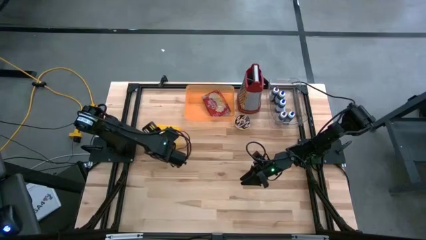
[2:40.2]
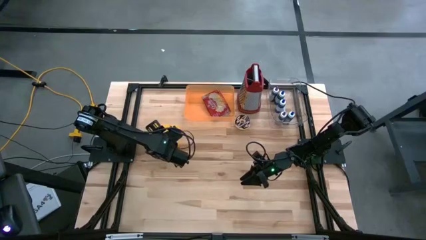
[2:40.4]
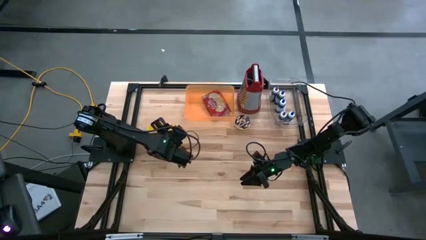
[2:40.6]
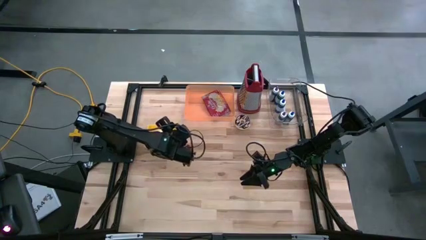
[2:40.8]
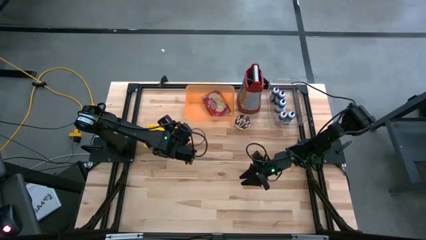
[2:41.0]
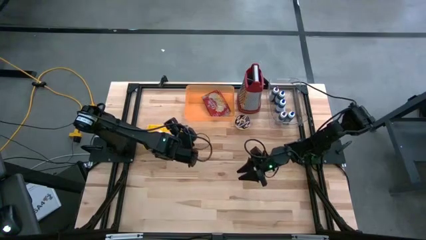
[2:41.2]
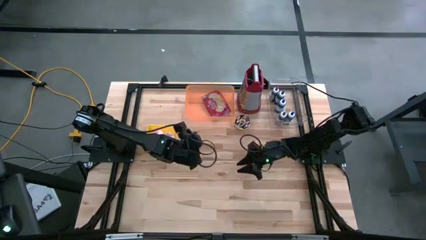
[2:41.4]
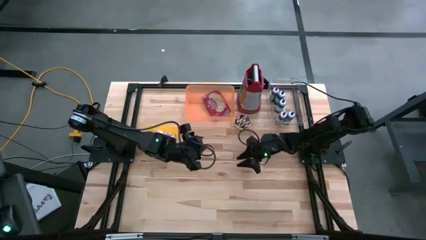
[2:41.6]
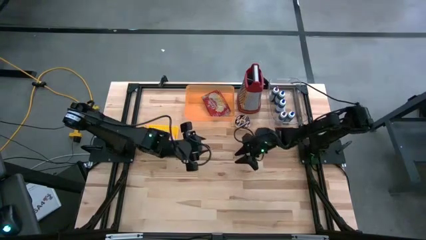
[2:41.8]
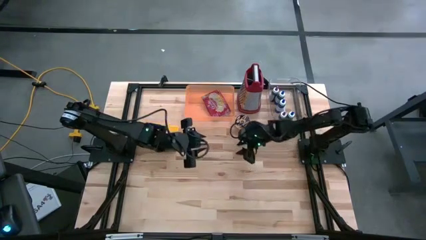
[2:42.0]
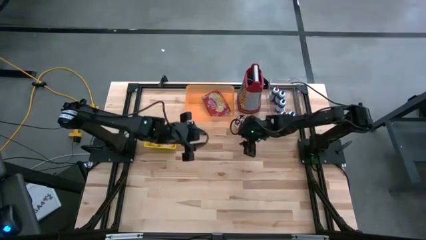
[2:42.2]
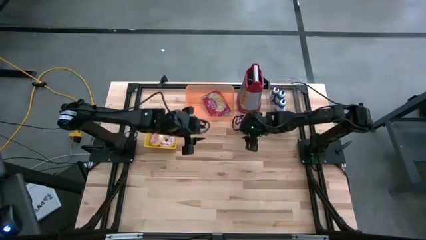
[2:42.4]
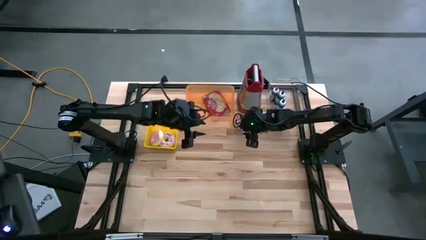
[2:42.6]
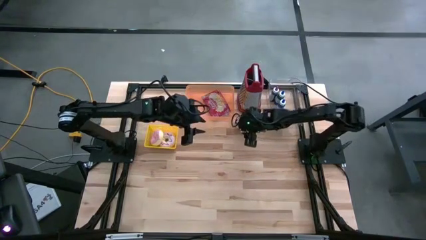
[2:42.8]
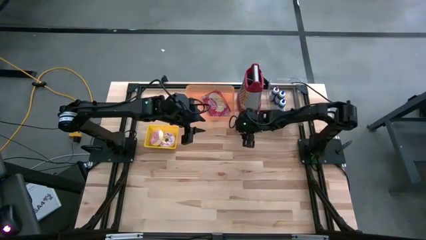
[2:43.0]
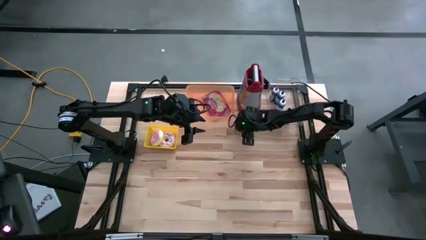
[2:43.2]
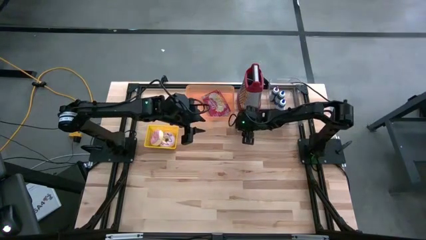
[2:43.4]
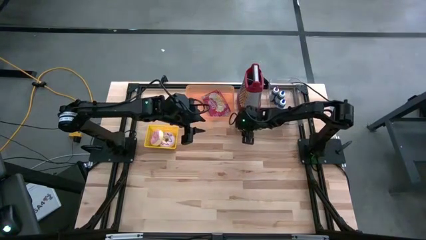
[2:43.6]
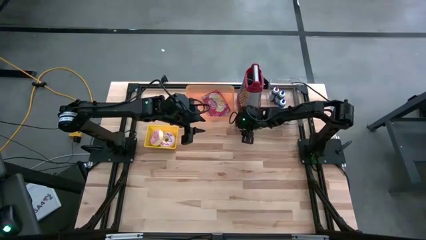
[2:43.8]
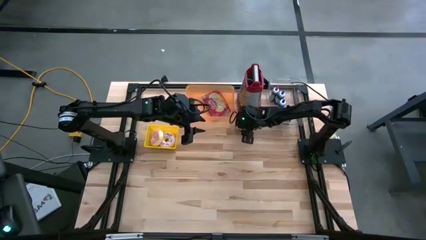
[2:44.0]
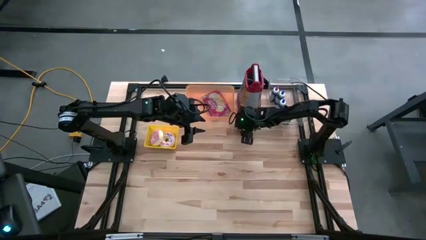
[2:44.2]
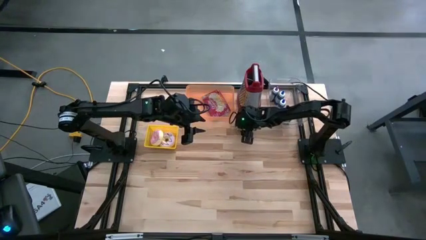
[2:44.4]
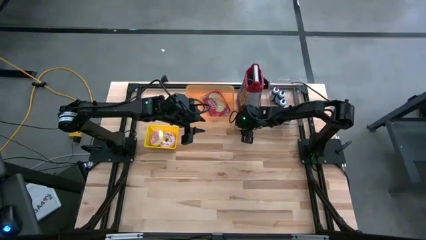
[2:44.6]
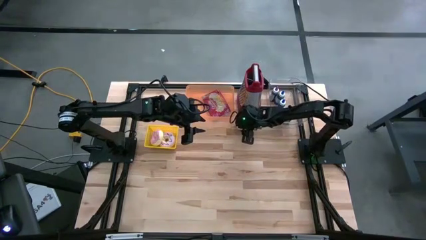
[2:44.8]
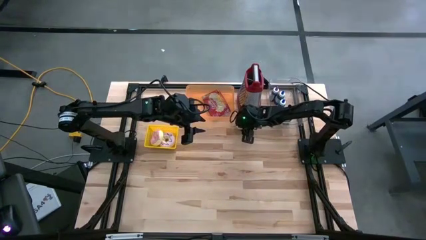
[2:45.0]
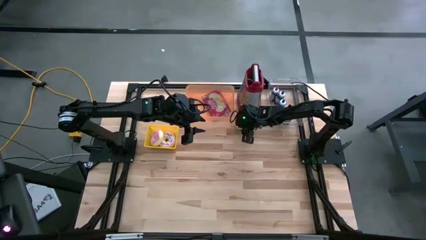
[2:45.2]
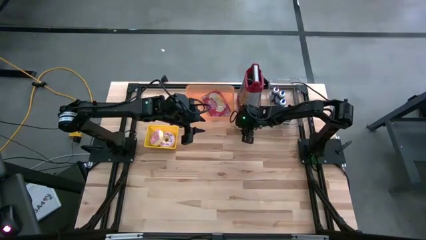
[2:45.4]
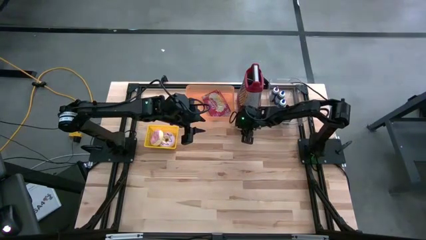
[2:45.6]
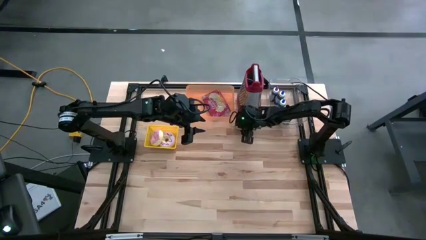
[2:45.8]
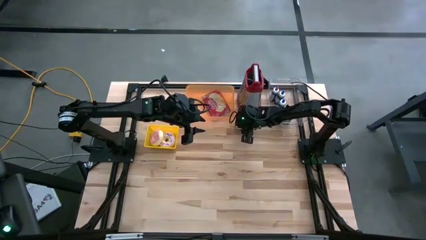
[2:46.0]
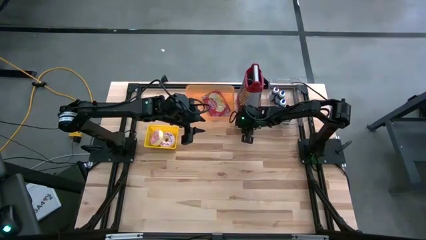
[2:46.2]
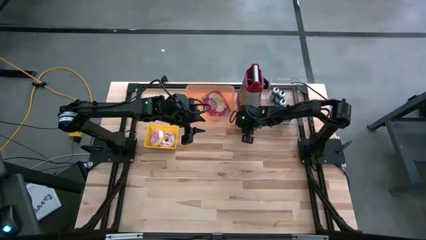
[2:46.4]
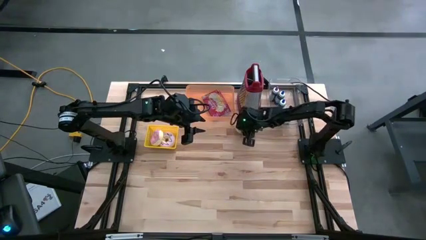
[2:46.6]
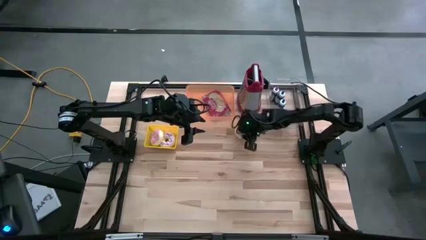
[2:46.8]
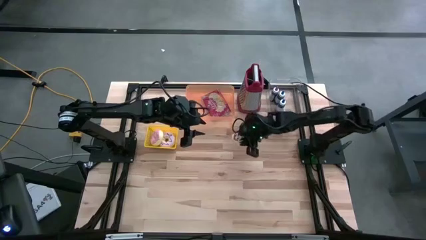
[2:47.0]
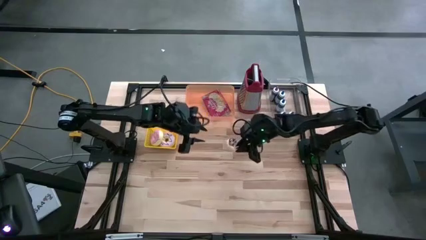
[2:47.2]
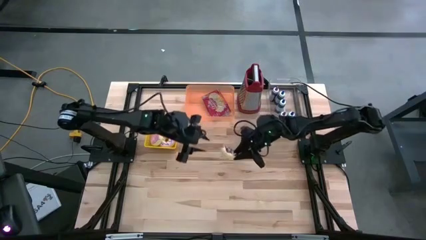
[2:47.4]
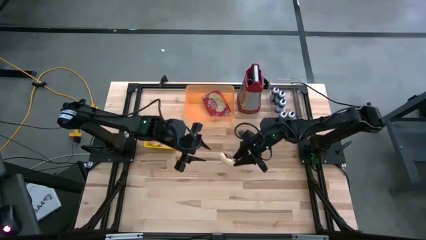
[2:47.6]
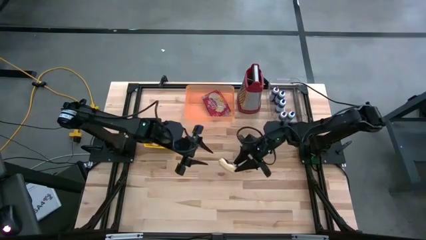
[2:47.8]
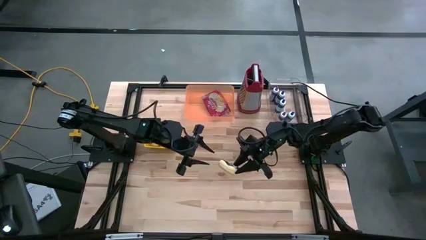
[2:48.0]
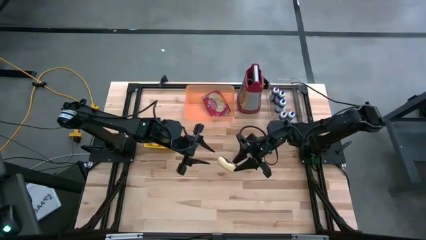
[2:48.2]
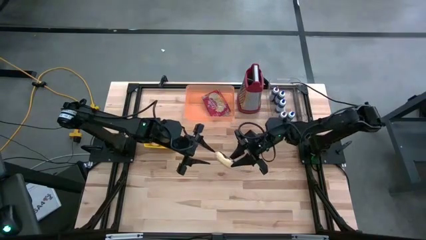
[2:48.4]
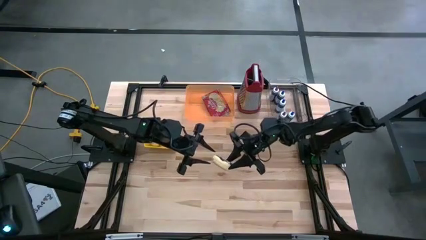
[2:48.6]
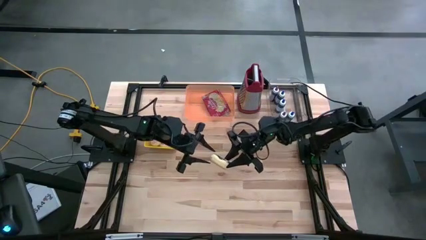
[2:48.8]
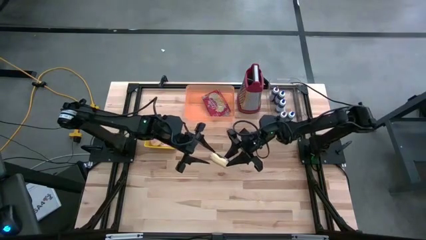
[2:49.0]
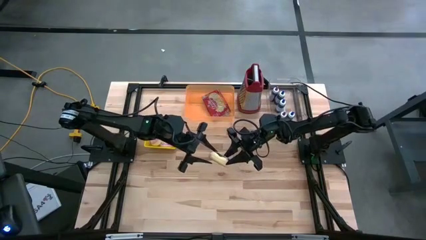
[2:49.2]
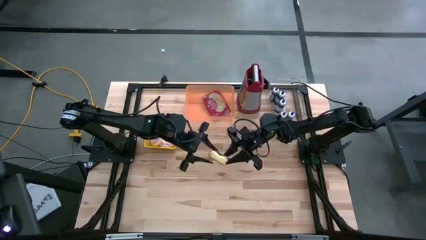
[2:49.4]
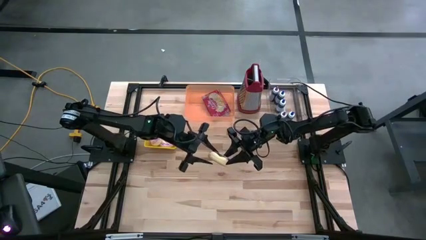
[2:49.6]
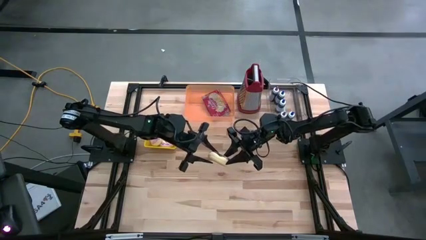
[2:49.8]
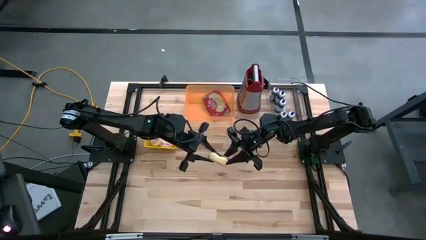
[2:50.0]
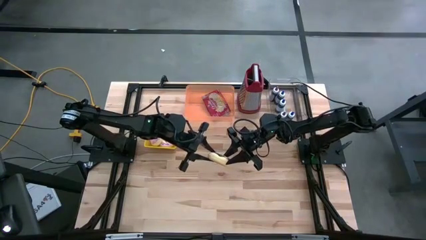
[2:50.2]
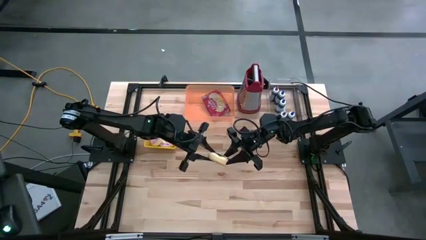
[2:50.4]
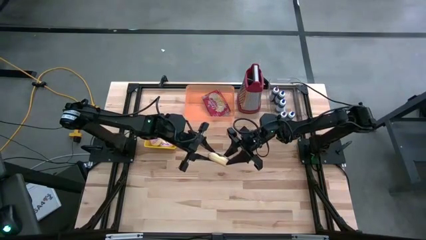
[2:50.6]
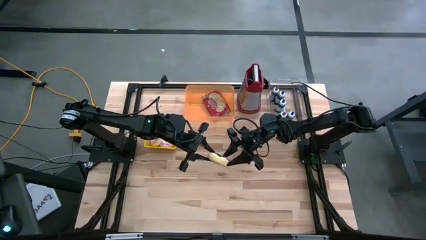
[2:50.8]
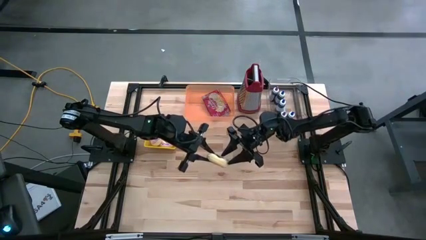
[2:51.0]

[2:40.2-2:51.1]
Task: Pick & Place Food Item
Put the black donut into the yellow bin

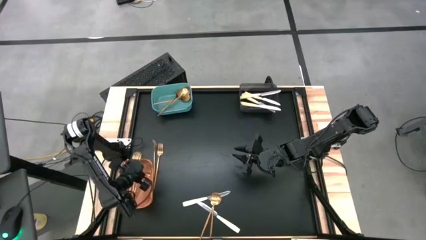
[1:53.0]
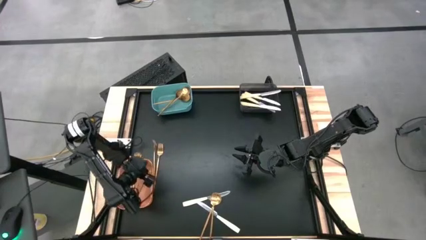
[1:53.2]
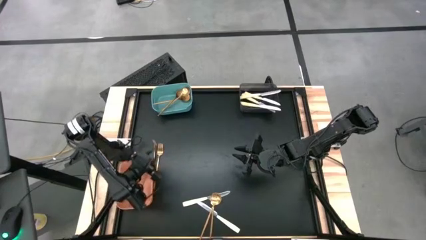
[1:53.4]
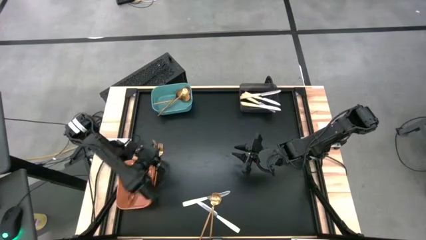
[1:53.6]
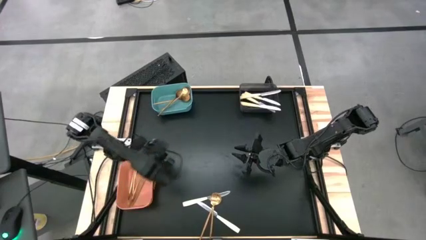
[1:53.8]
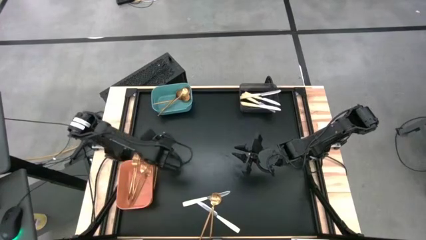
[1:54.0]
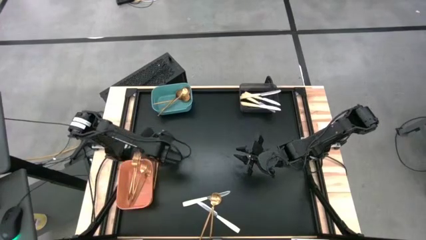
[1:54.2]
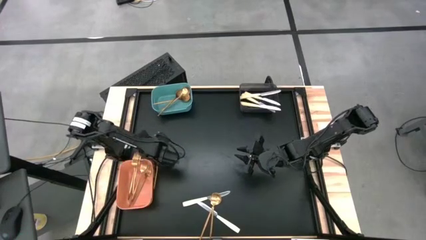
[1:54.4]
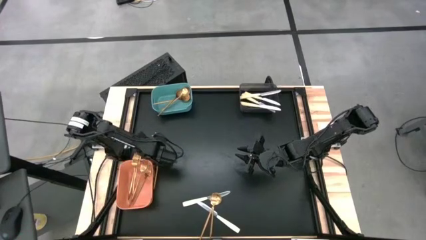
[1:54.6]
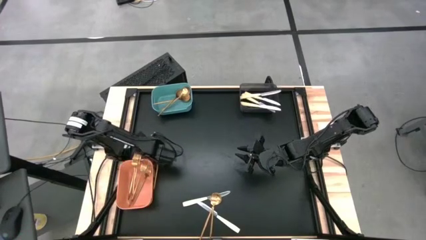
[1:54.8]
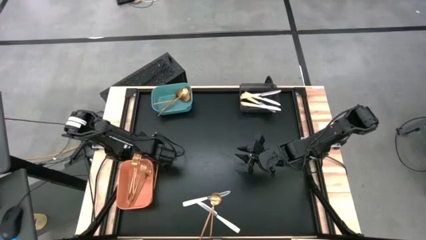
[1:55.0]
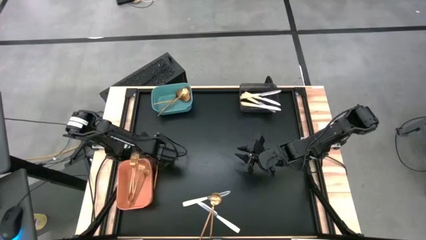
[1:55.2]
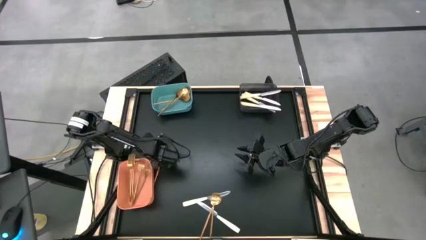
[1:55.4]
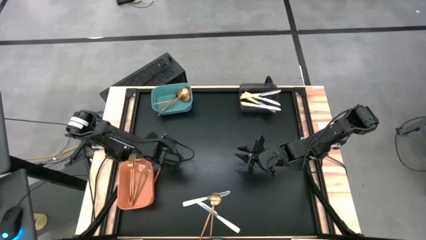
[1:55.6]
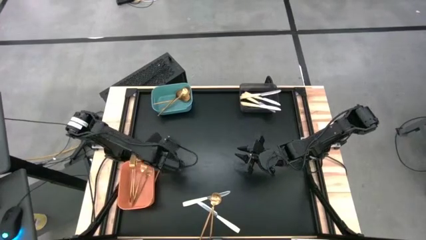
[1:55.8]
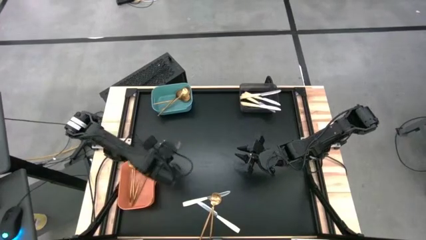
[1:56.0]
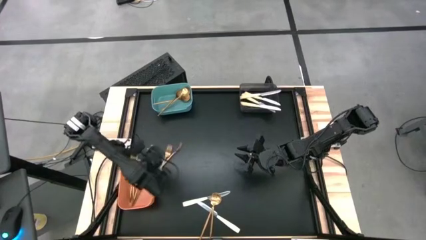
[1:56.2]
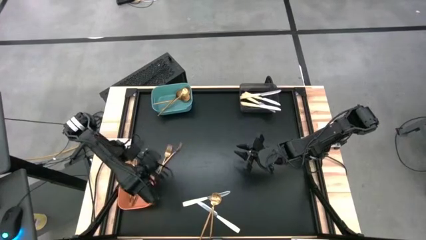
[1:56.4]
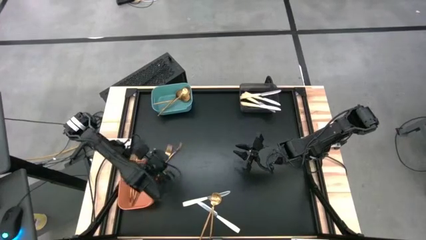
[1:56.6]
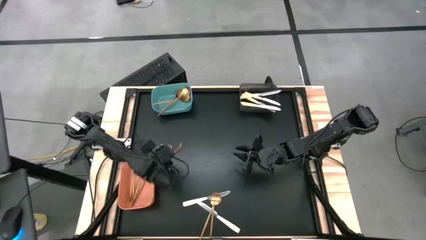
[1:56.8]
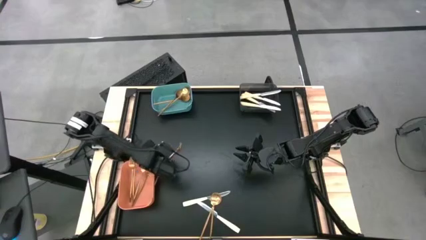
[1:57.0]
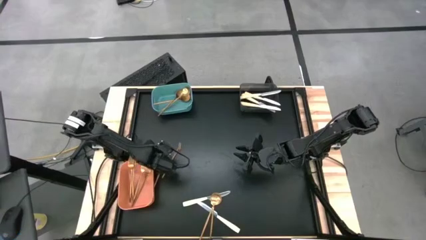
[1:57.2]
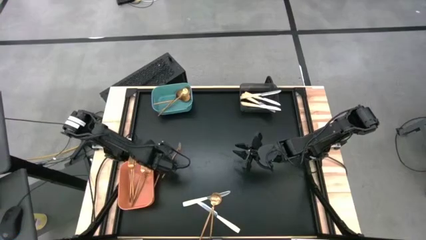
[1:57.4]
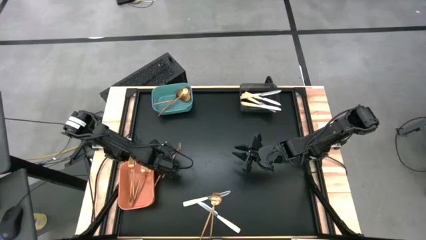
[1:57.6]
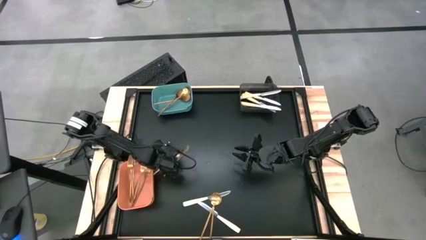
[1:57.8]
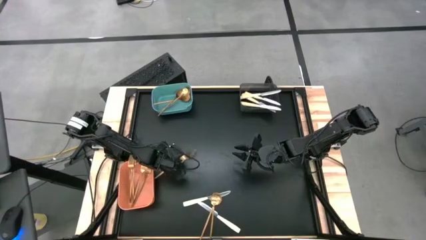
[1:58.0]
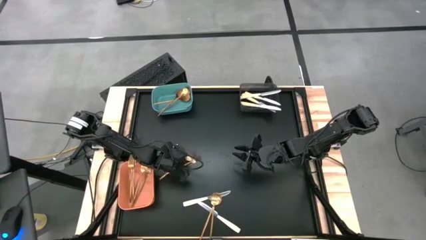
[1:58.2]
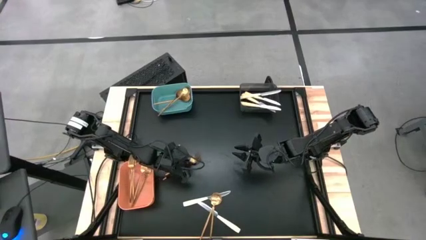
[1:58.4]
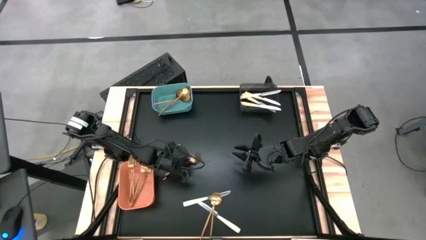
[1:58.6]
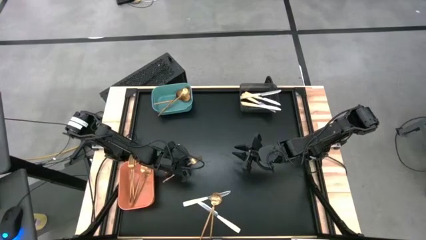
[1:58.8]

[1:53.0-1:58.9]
Task: Sort silverware by color (type)
Put the gold fork into the orange bin

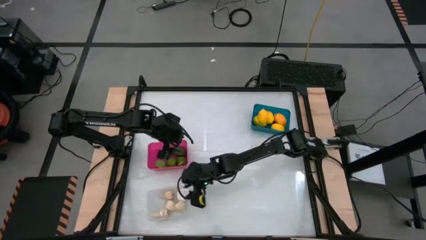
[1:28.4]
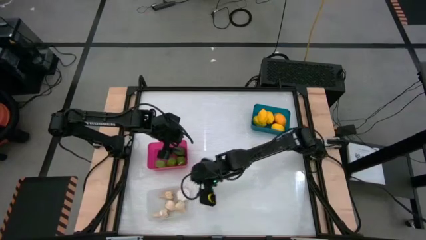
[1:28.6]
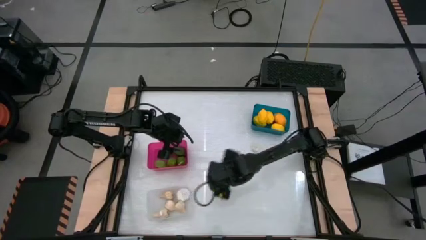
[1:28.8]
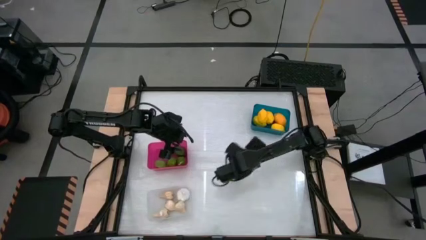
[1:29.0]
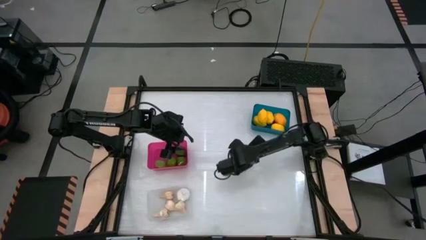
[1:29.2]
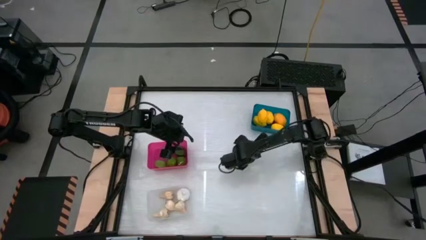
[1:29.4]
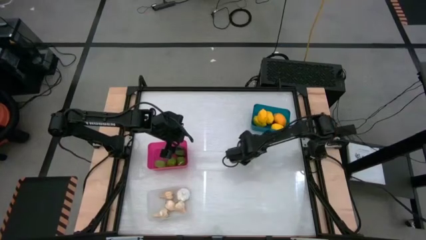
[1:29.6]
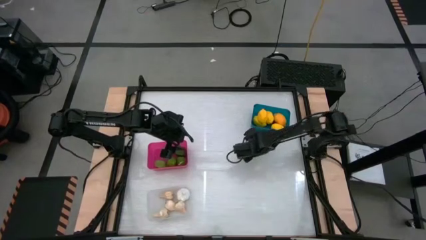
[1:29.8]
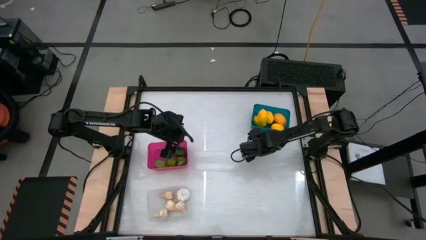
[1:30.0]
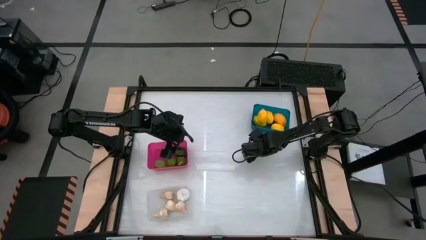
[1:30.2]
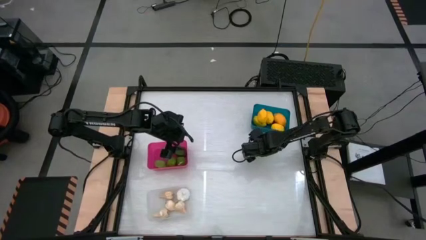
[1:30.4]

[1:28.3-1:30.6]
Task: Sort produce into baskets
Put the garlic into the white bin
